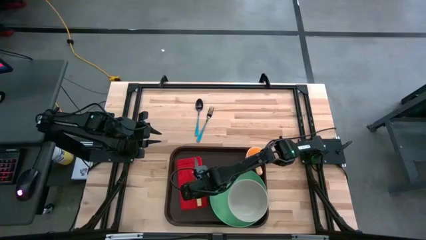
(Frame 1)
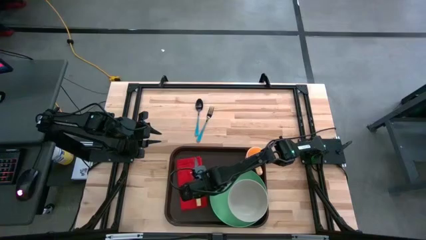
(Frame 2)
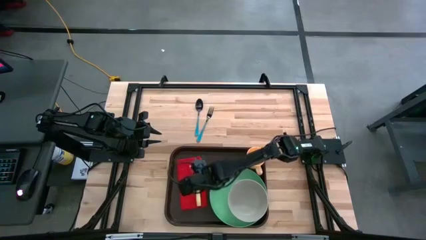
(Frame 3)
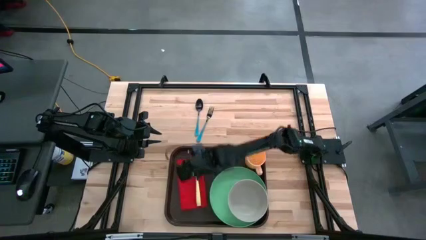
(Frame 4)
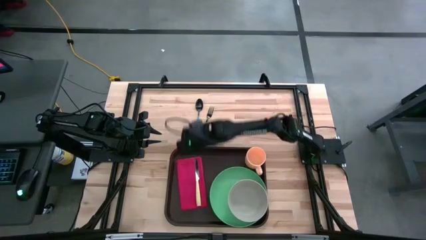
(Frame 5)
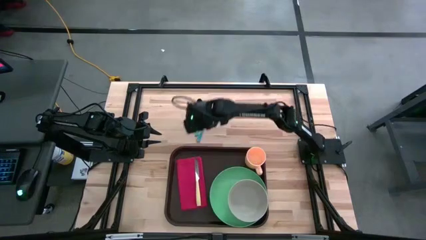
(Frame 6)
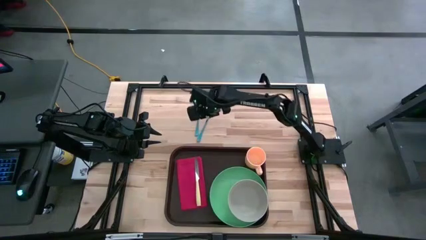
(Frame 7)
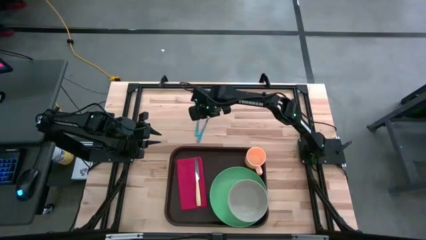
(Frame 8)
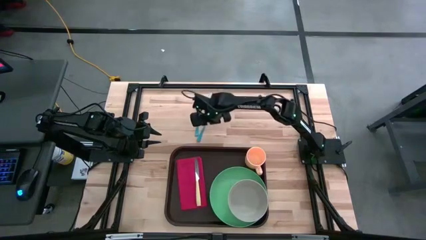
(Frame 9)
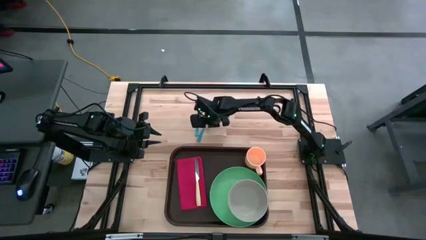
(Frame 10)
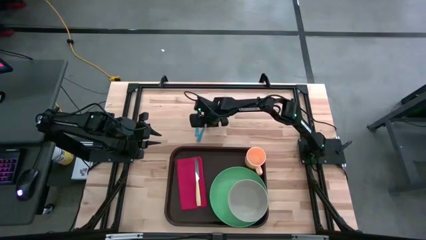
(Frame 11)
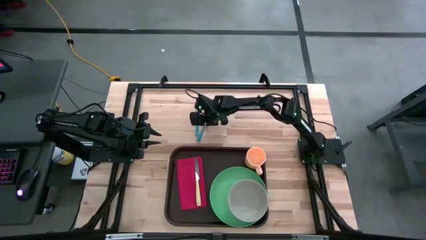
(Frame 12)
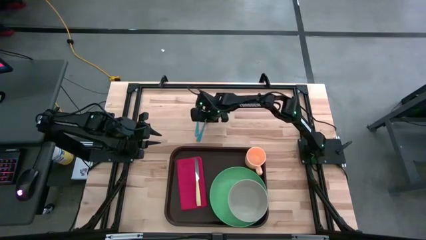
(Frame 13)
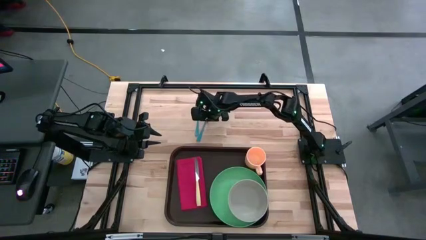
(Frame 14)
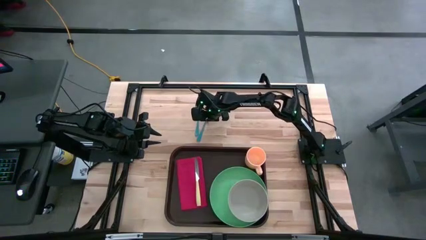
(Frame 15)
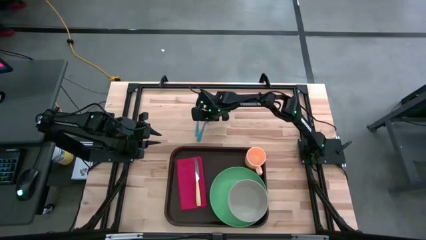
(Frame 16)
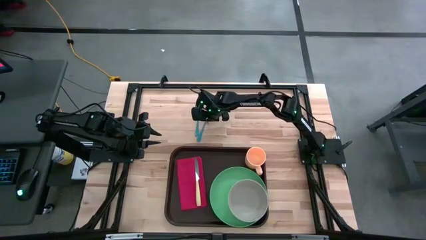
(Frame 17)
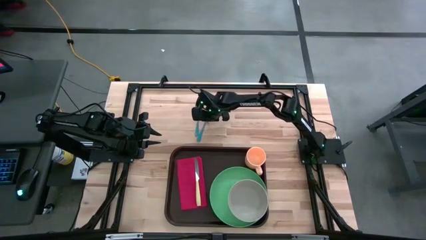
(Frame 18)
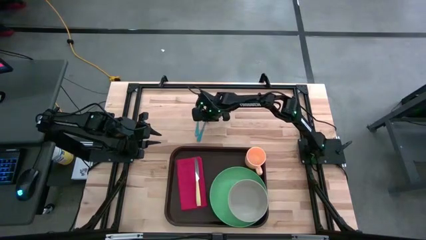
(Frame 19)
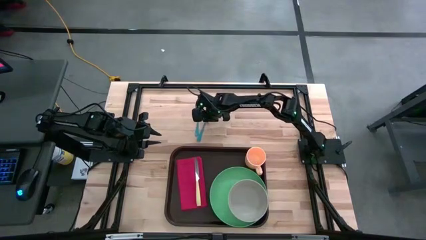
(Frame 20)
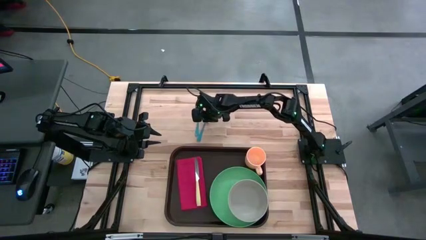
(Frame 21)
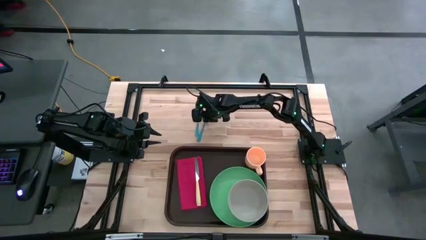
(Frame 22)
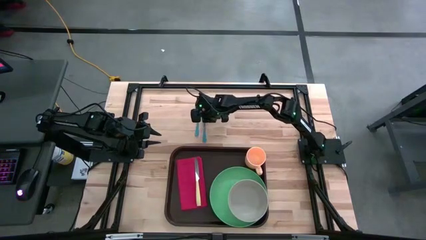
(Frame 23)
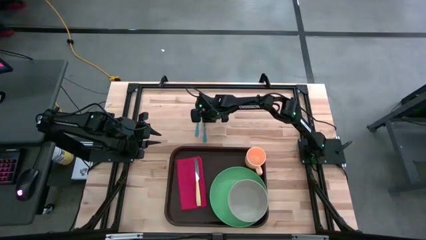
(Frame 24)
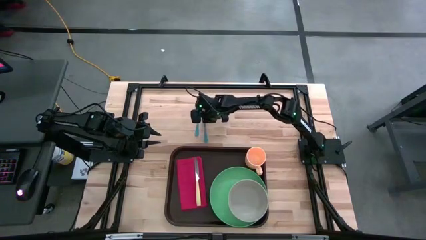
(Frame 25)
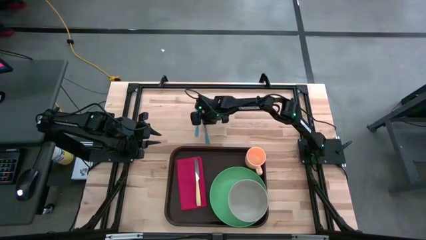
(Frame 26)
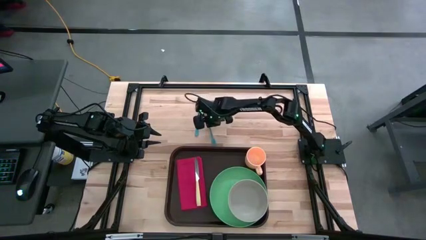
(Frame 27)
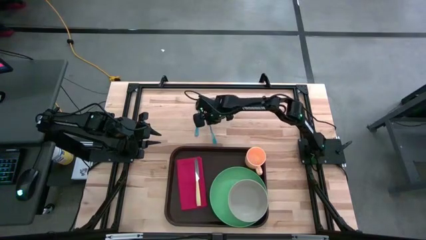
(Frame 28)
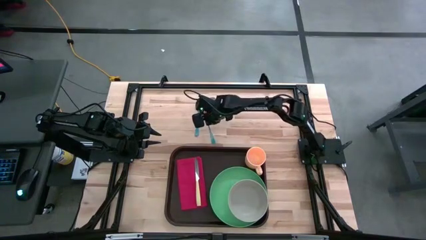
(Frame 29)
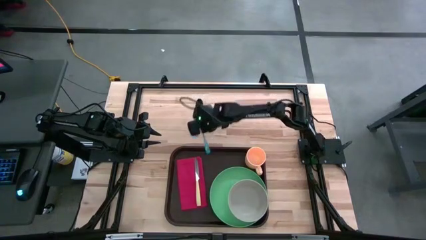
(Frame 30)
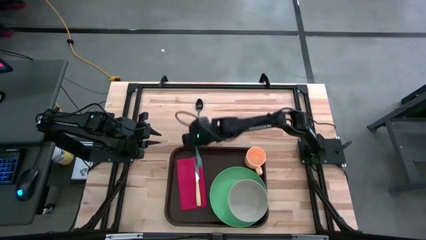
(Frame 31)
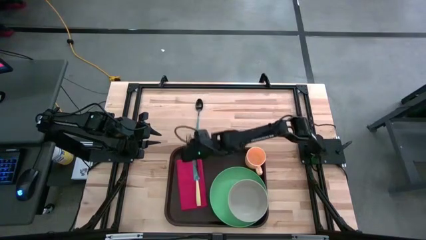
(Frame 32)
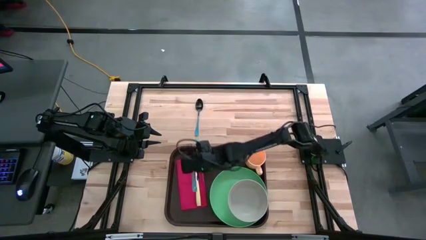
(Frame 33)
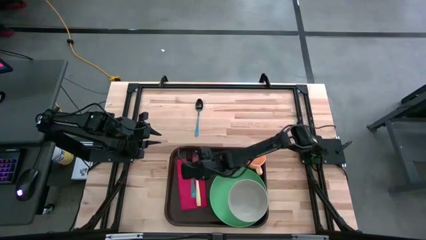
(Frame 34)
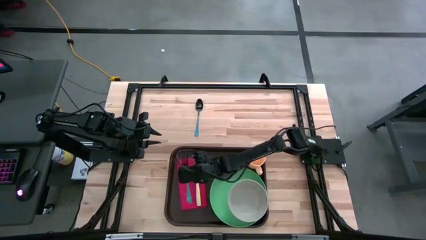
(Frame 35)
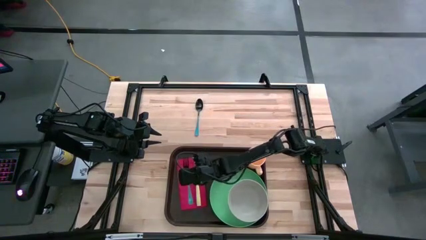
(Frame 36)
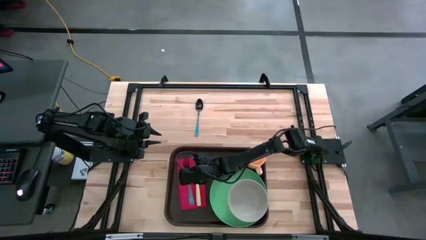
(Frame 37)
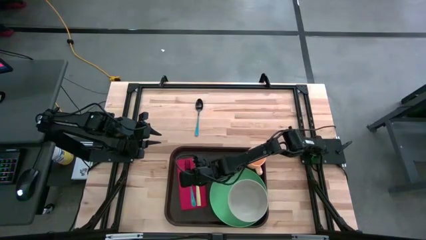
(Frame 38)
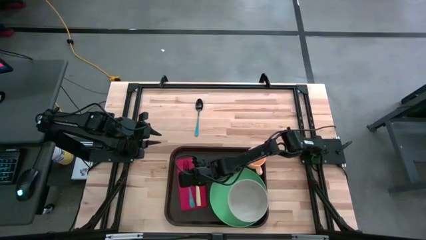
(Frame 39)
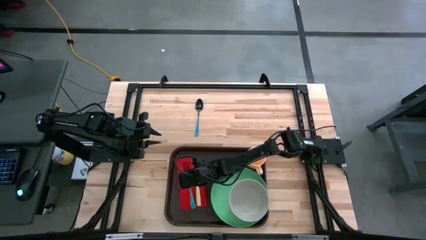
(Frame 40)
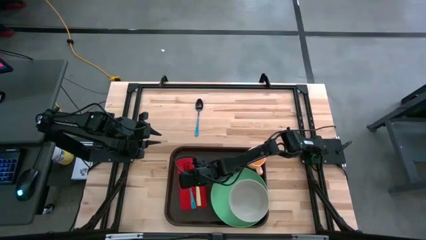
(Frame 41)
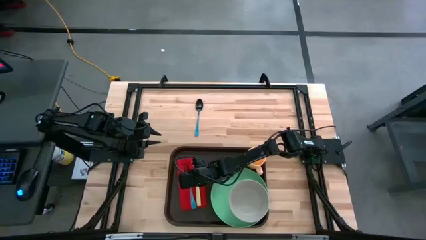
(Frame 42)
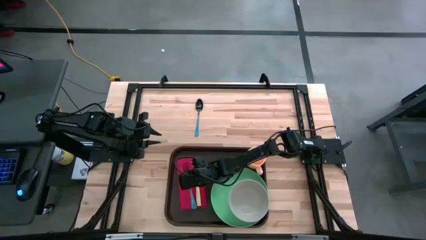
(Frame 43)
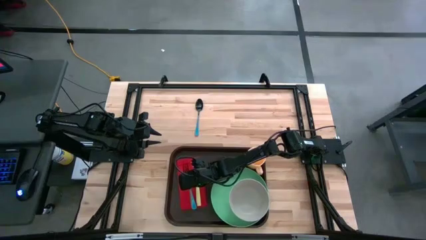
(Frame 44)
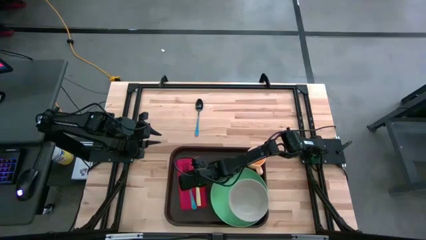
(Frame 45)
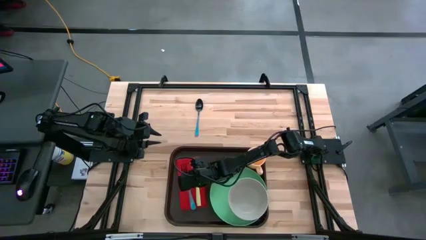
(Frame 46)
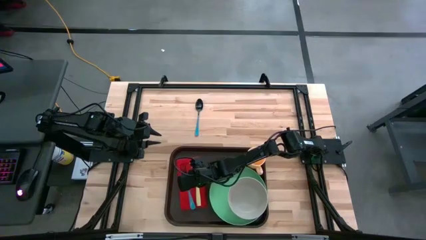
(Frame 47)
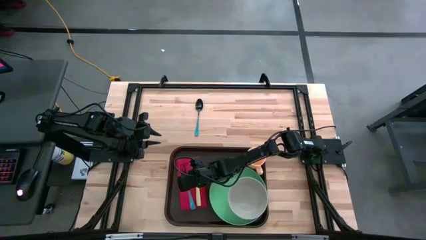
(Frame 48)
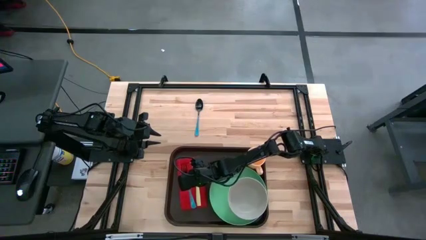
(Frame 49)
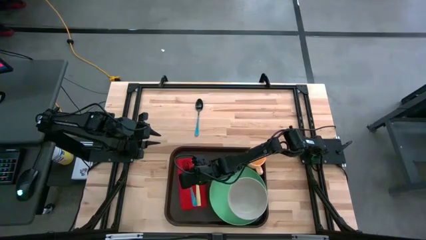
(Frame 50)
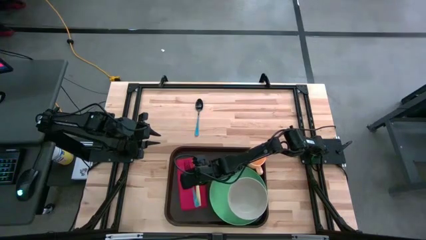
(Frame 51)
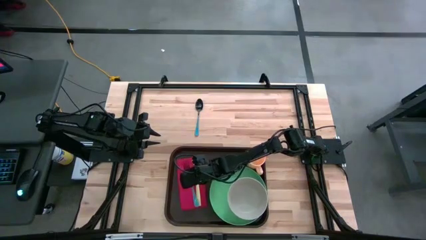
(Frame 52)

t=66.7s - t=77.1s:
Task: Set up tray
Put the blue fork on top of the red napkin to the left of the yellow knife

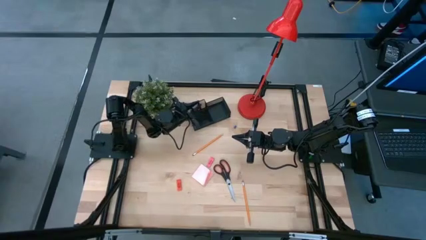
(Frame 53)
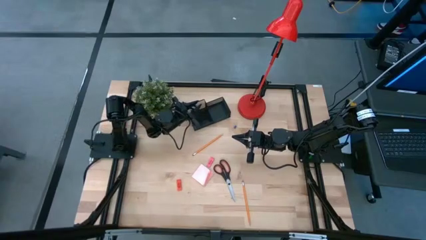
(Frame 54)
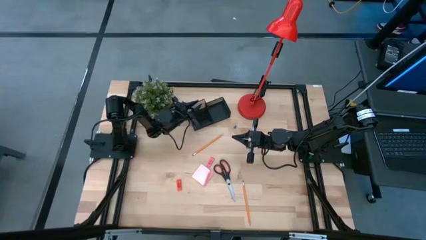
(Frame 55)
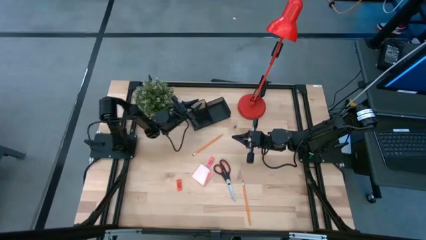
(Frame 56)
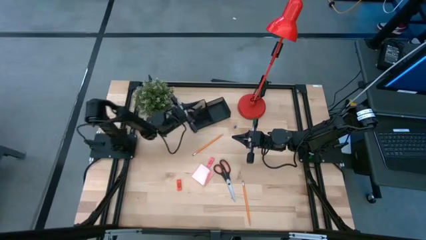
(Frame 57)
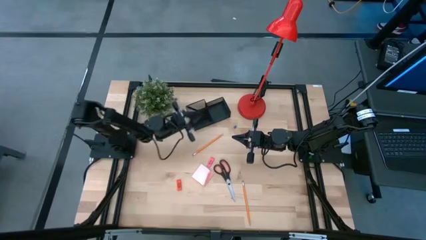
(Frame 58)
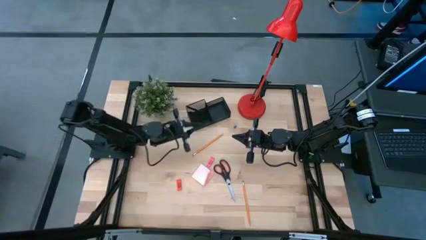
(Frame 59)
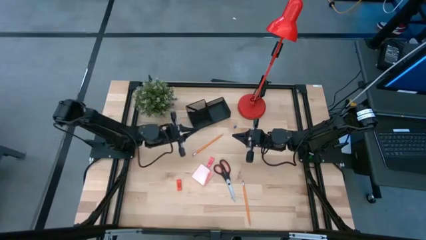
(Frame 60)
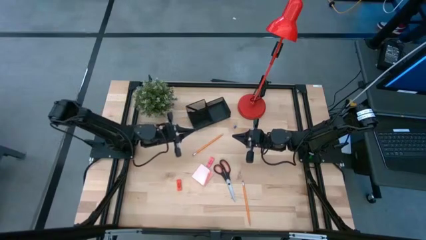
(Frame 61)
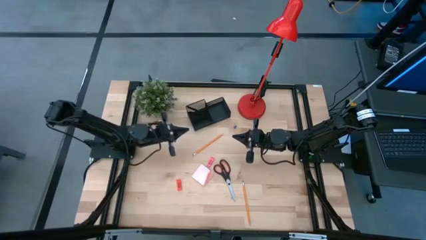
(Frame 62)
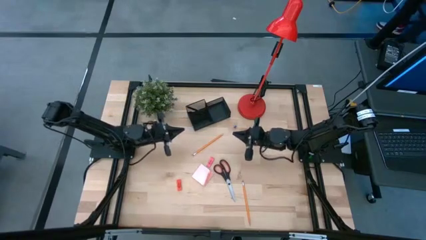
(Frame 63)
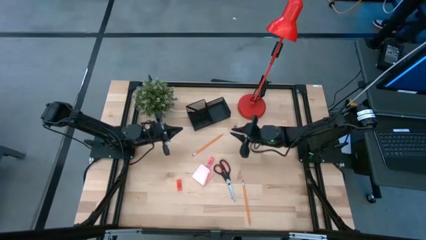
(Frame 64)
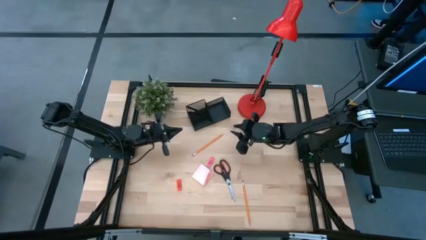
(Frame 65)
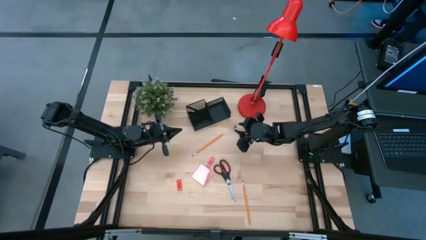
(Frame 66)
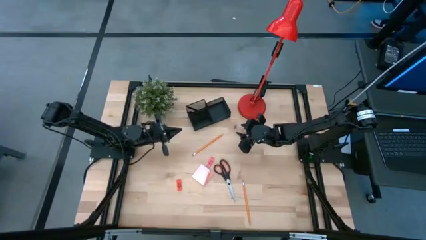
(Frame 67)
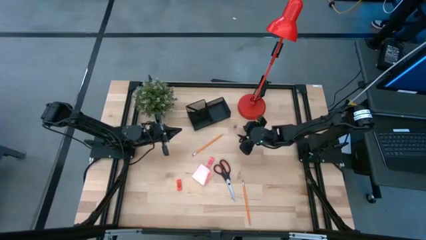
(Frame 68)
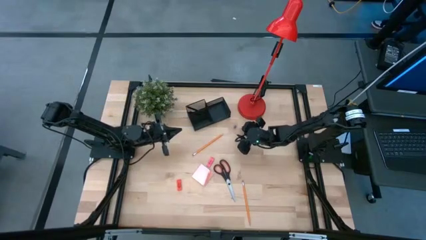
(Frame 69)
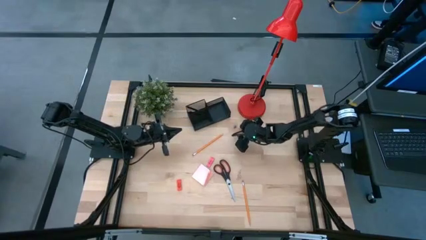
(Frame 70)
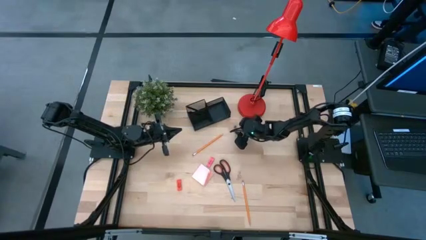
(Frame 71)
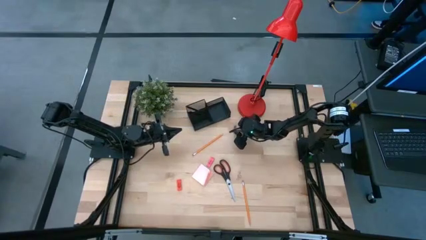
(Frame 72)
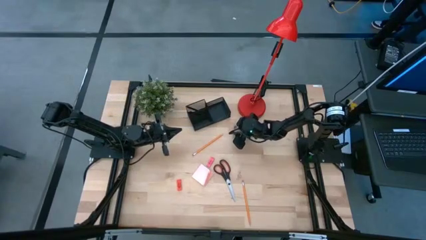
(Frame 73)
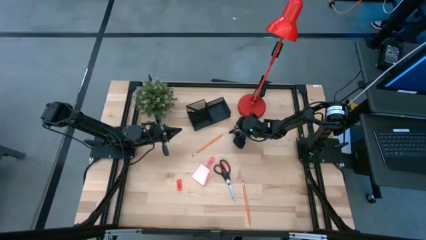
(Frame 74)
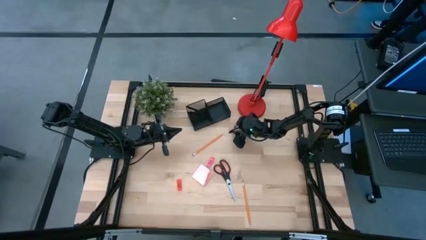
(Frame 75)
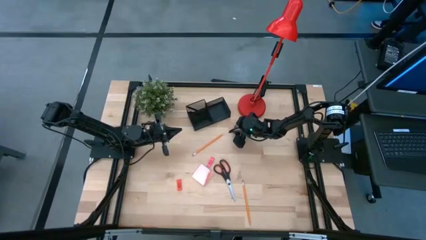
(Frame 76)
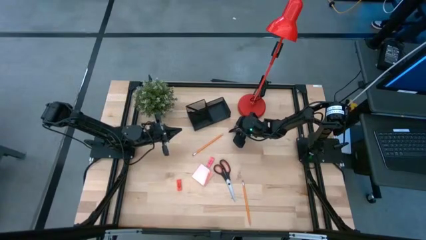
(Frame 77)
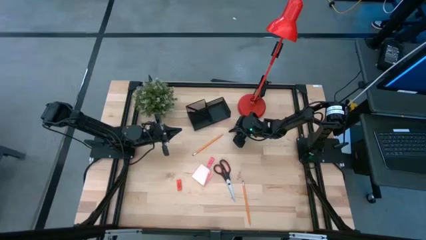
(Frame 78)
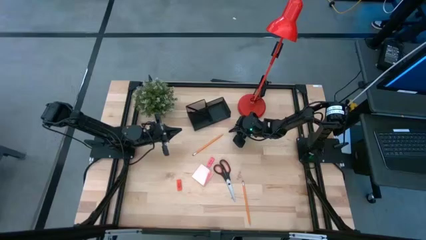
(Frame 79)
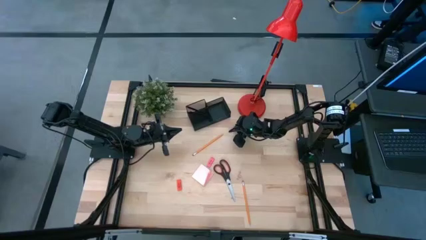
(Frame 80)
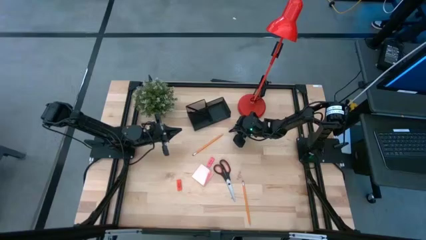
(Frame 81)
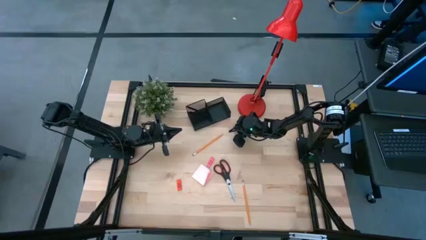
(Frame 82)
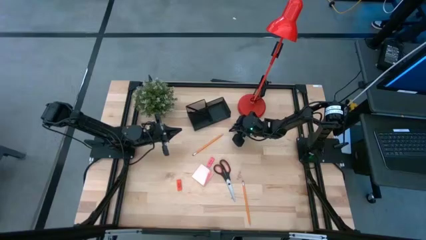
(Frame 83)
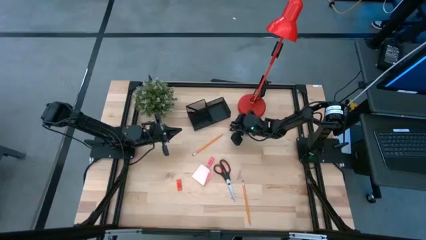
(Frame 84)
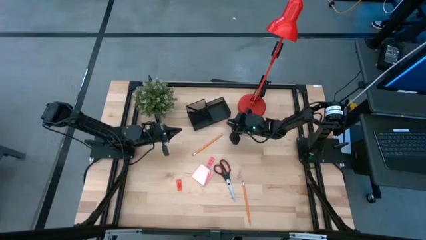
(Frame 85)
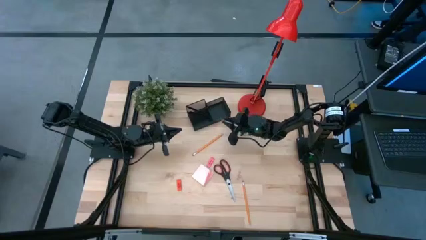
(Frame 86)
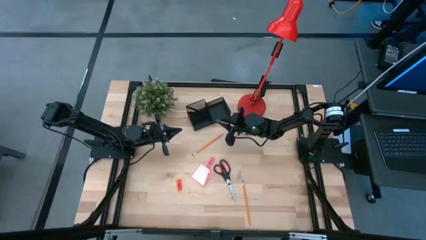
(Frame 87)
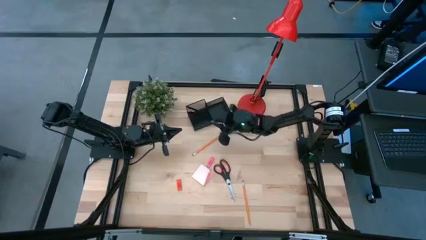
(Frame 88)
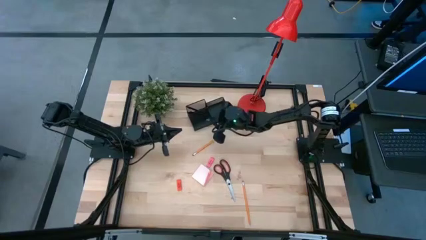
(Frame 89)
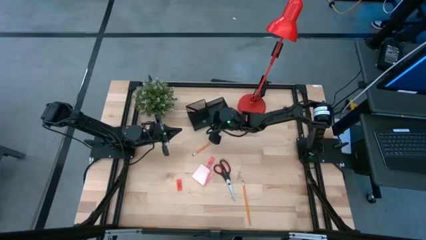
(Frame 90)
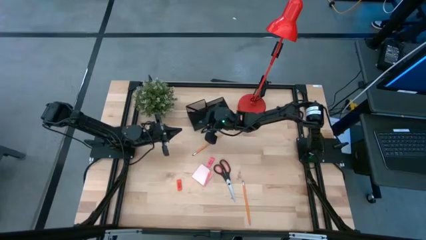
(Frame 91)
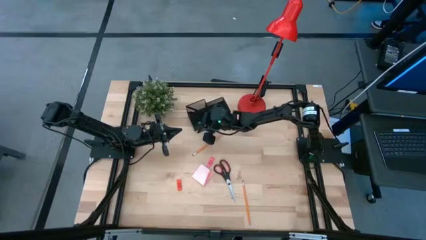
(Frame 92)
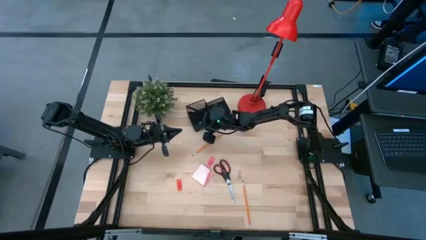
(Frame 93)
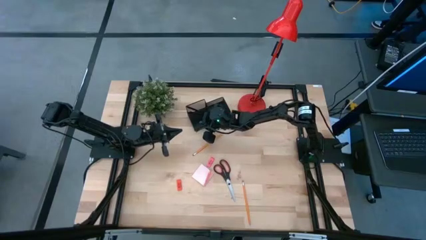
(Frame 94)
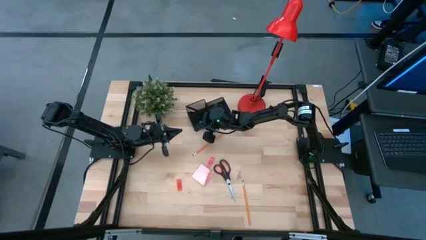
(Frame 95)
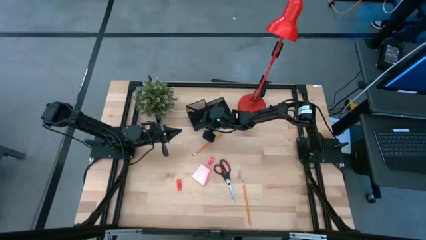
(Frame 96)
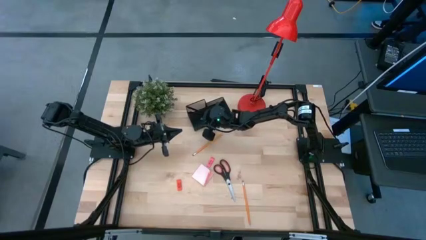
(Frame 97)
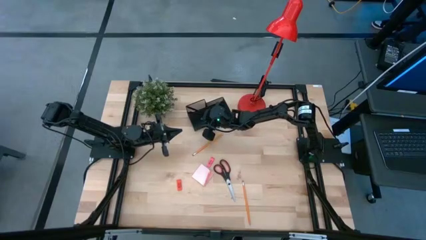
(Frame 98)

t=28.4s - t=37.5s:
Task: Pick and place office supplies into organizer
Put the blue binder clip into the black desk organizer
